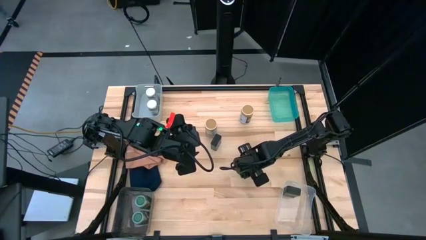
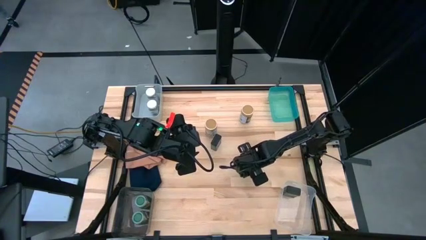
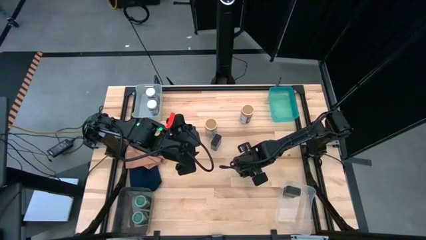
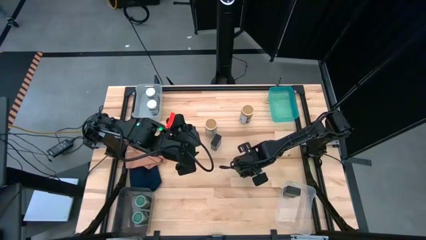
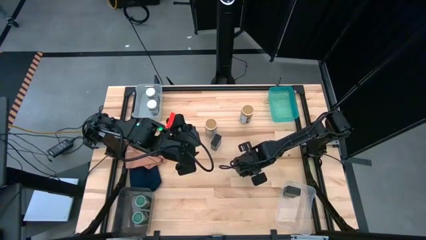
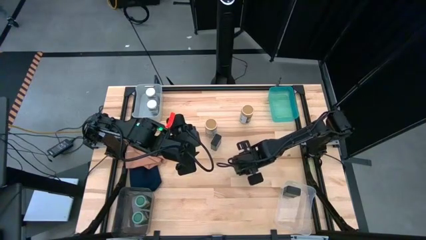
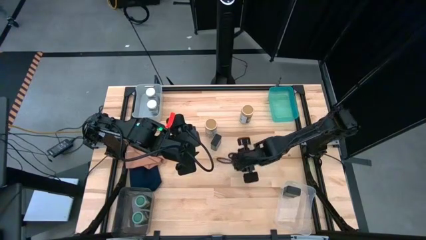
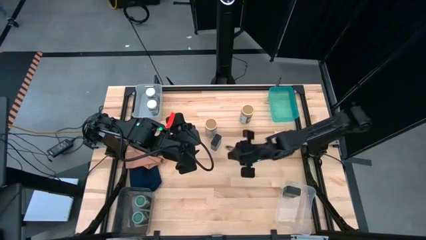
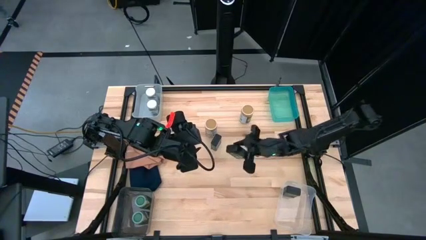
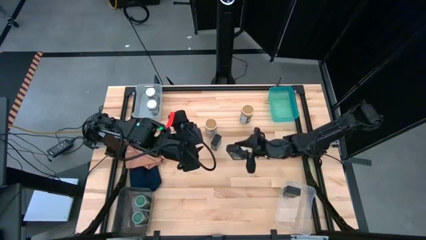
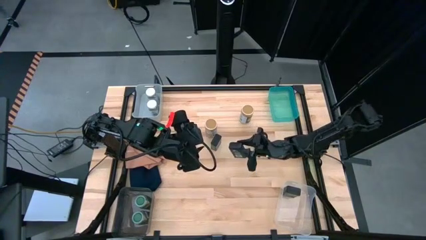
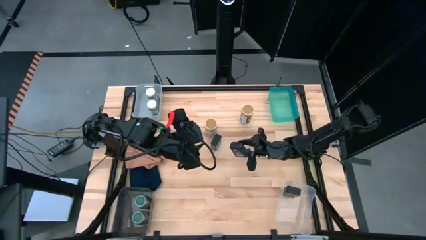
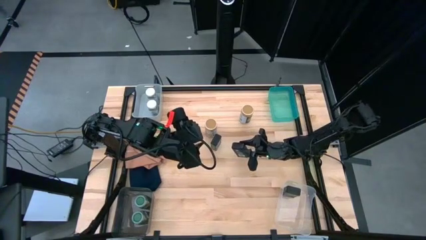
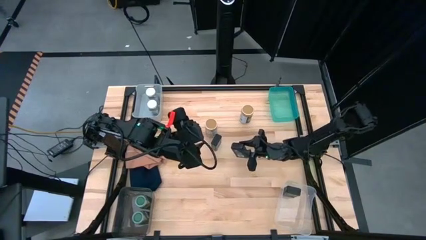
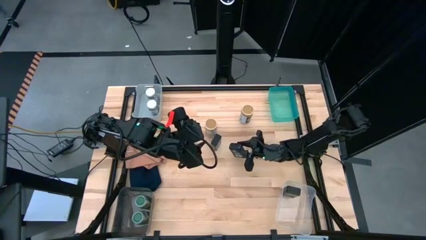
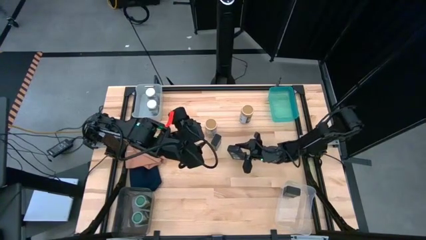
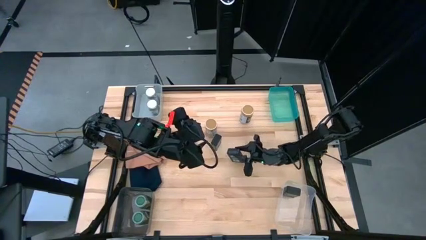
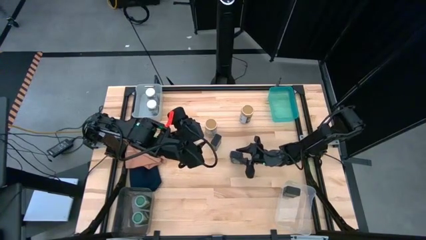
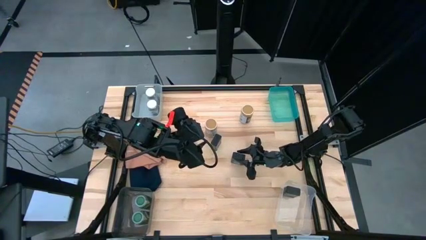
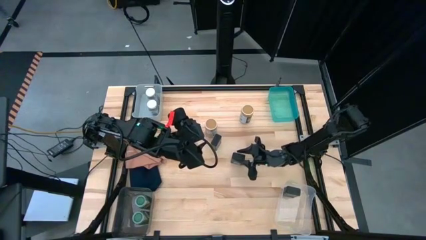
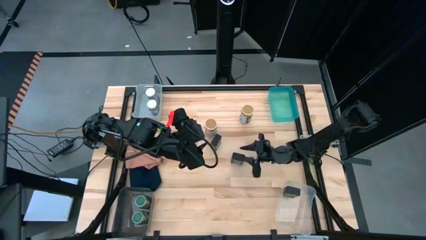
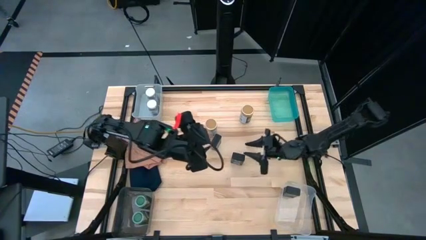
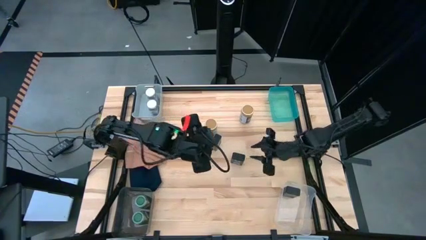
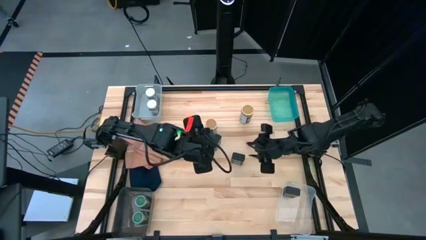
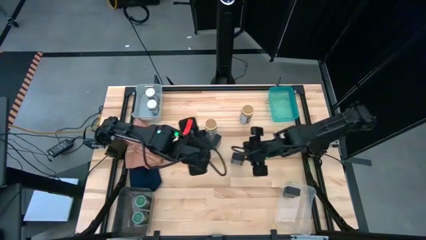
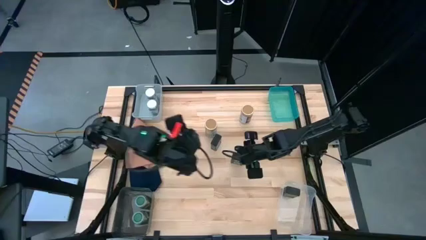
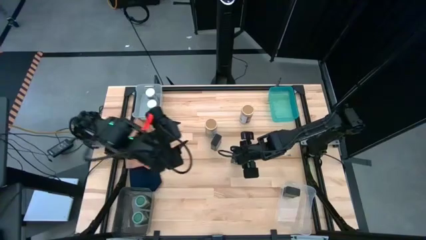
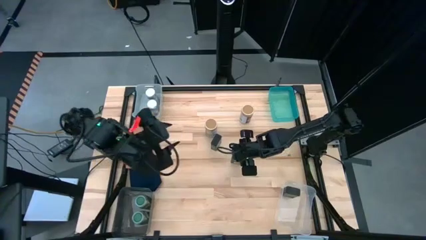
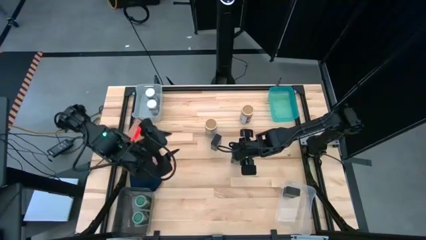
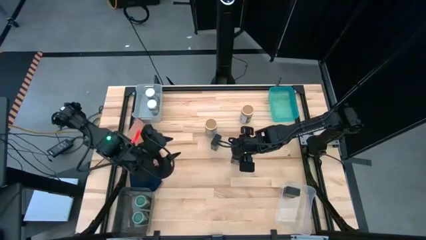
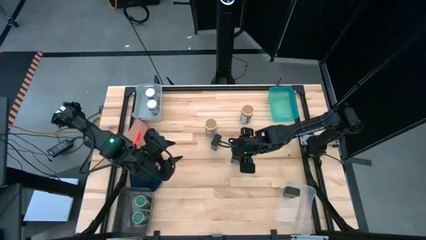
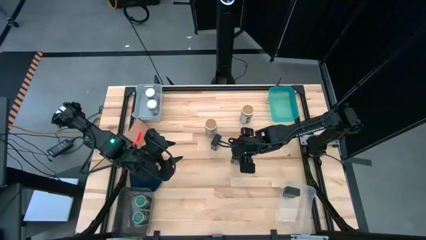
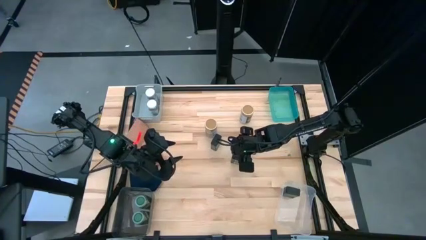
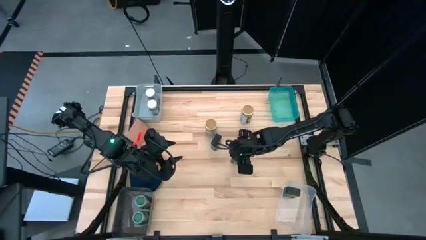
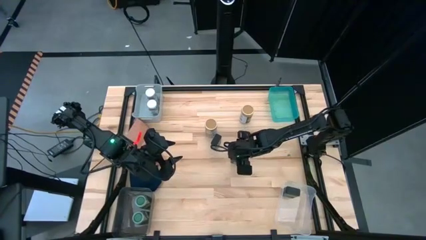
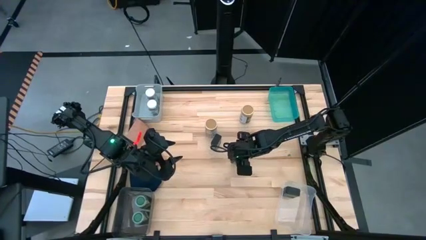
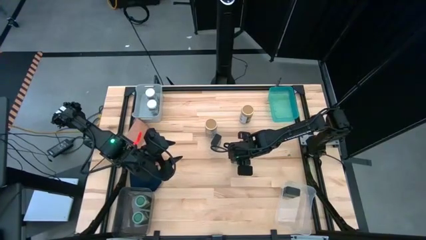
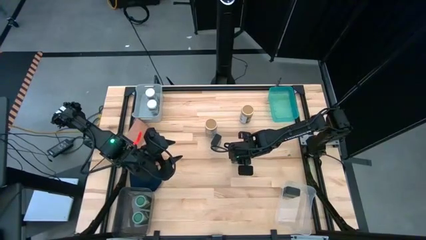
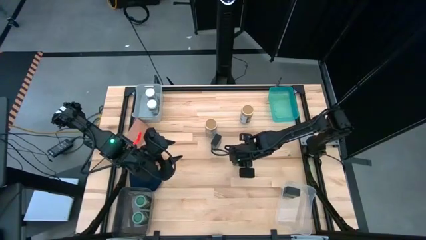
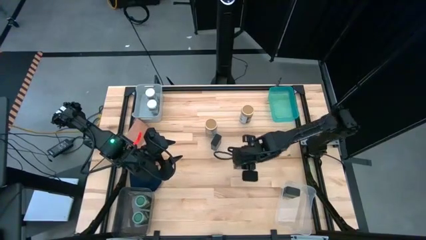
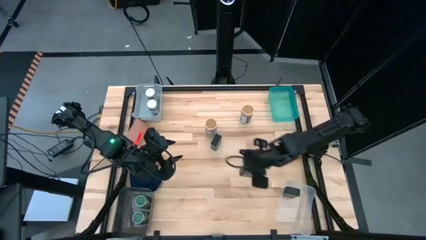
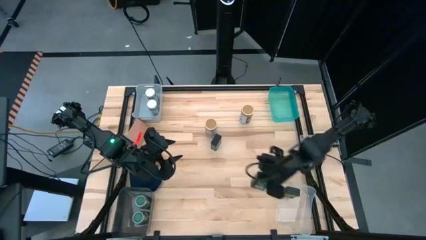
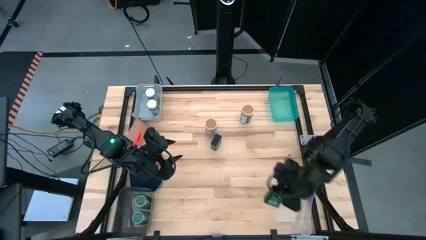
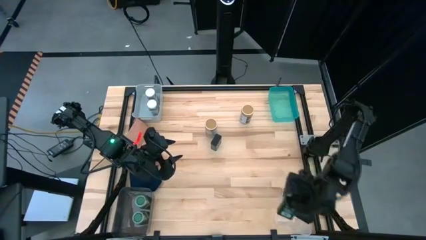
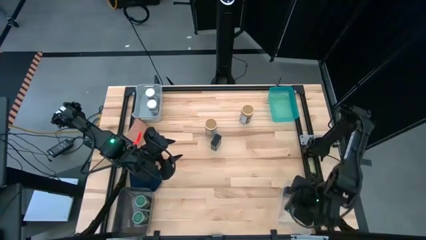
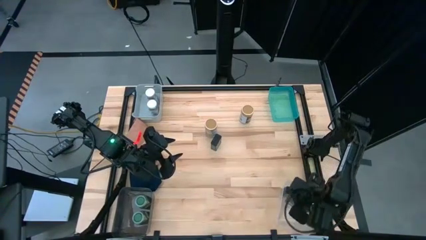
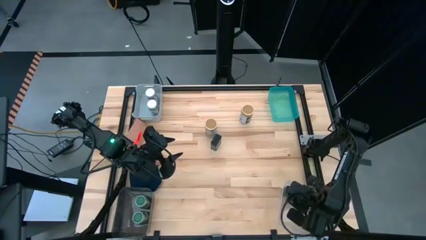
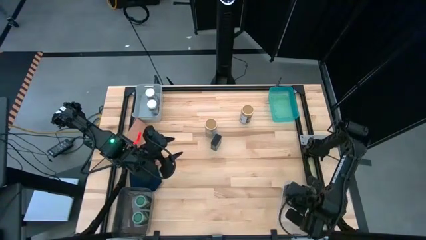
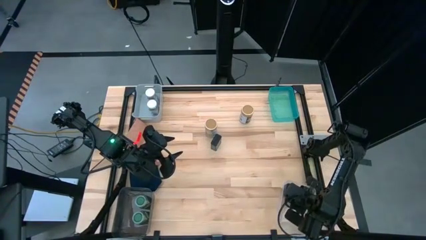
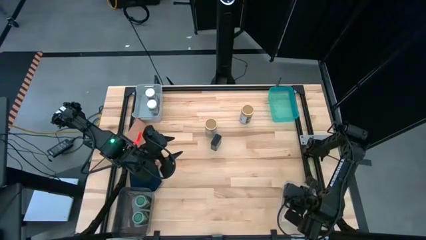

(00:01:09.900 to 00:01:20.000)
Task: Sort spices by type
Put bottom black spice can into the transparent bin

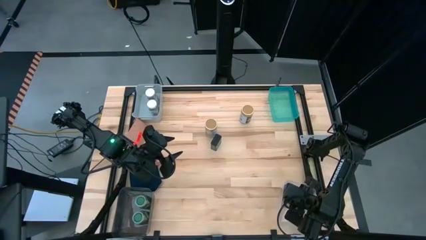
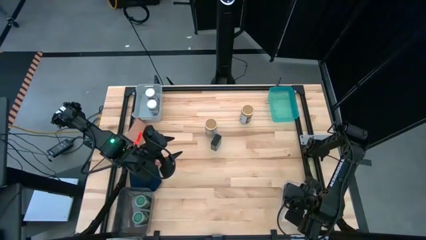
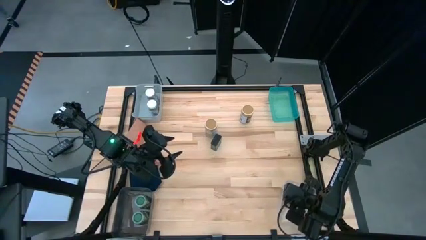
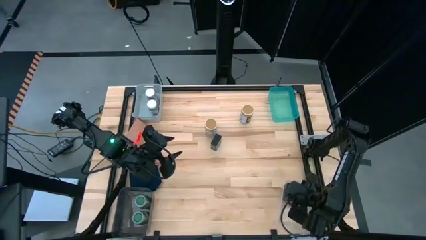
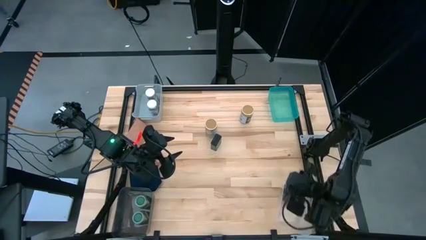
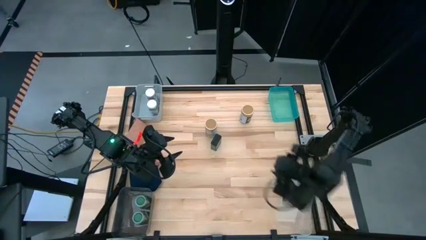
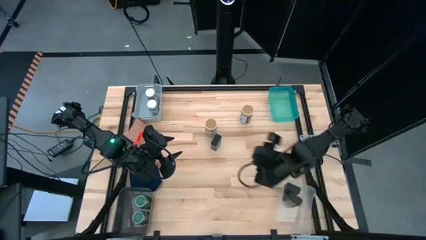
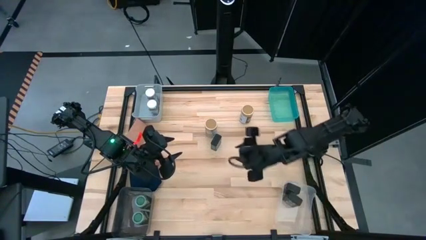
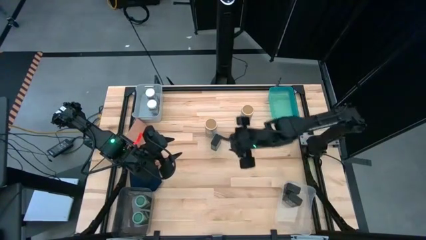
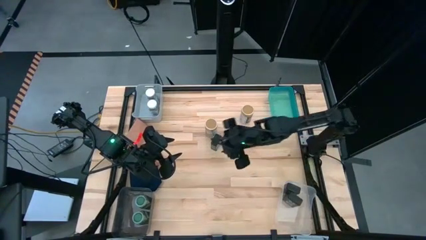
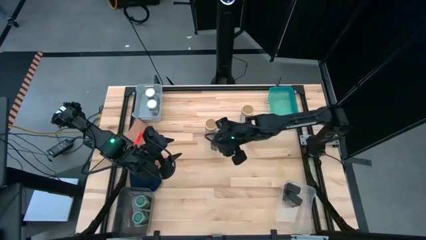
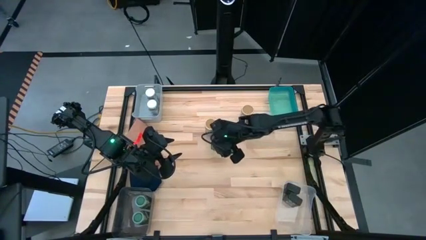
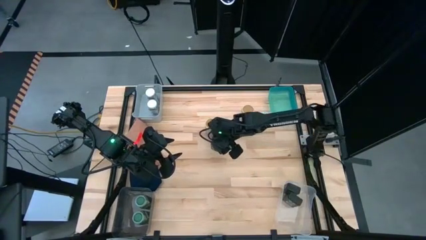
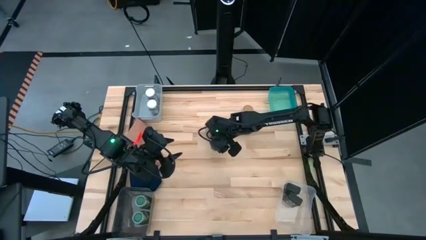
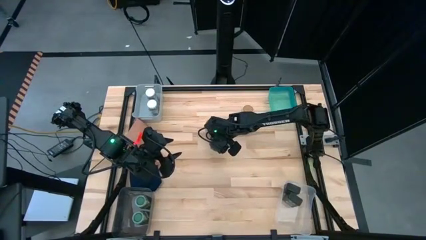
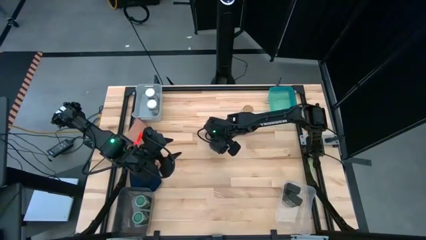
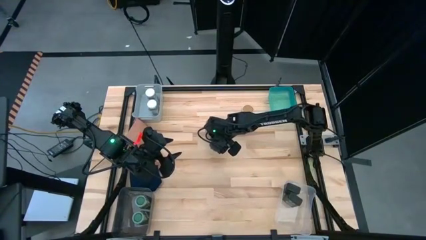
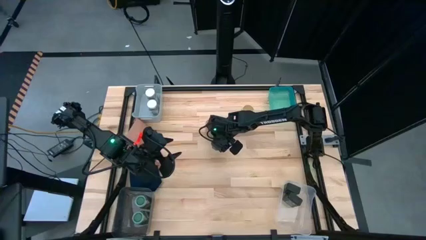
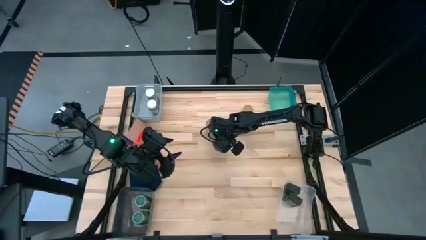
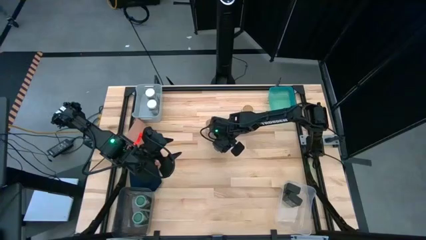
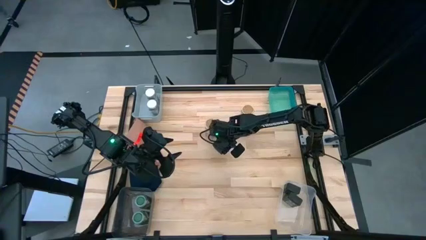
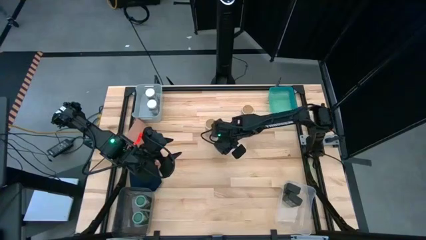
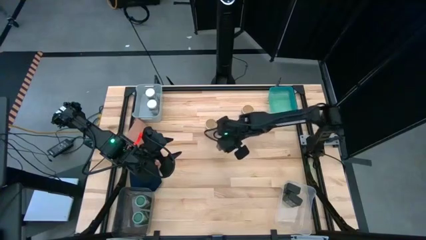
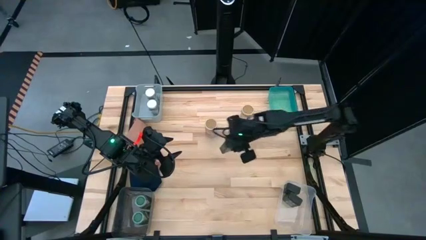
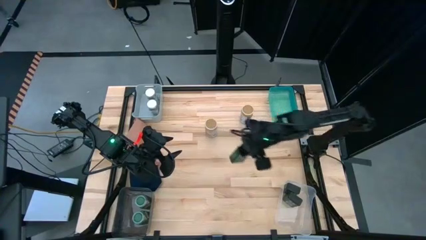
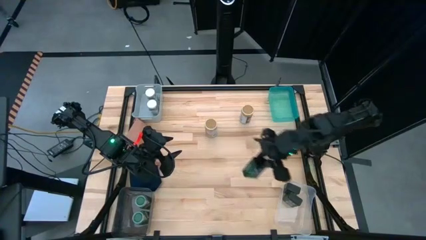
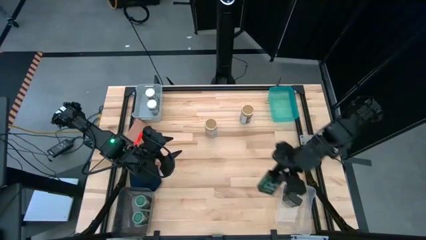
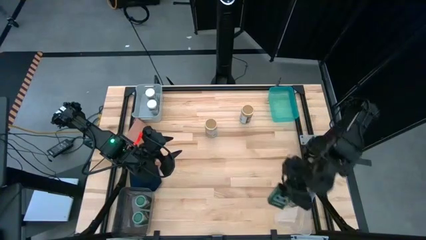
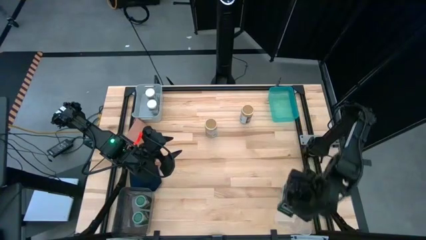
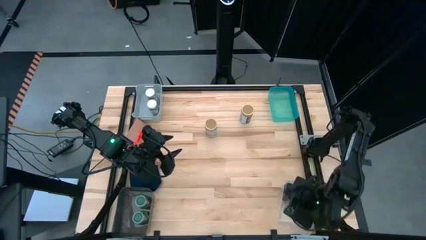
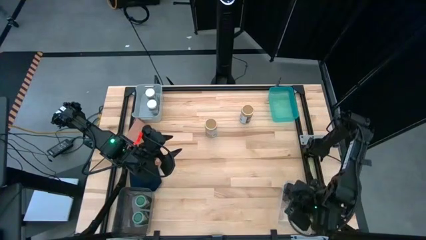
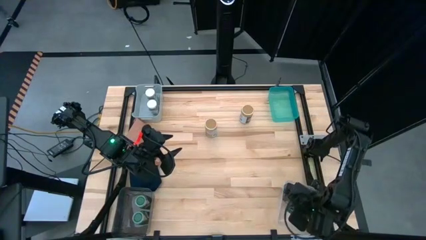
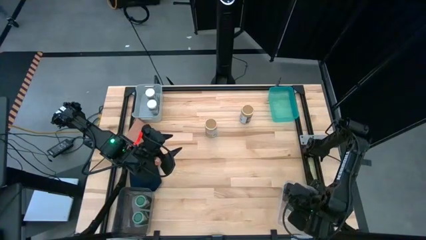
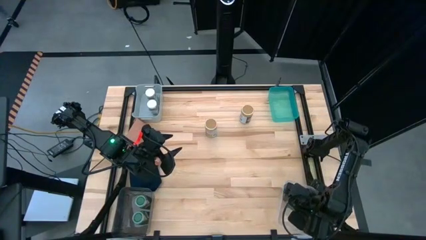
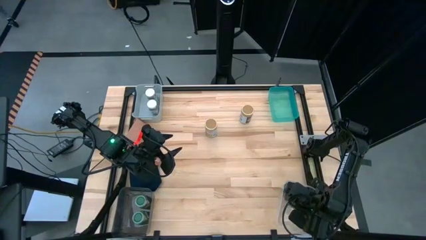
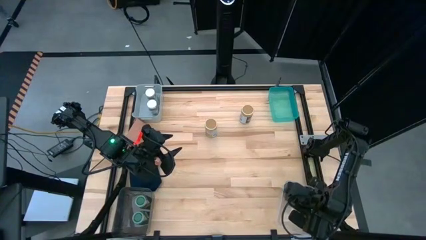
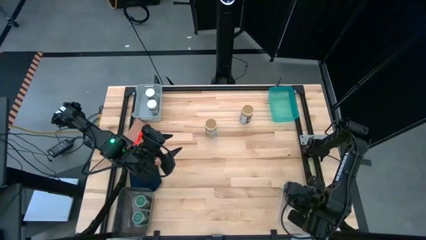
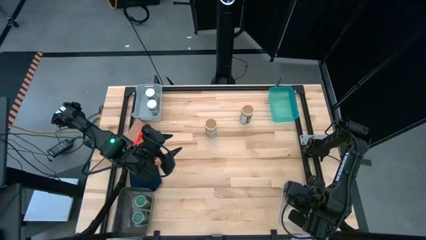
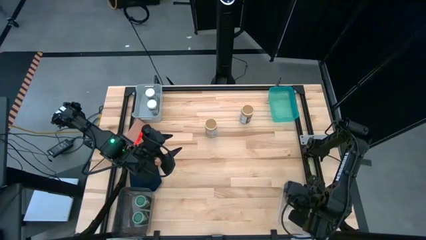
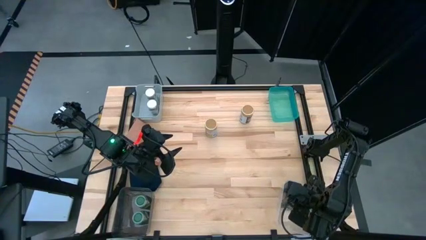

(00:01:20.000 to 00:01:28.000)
Put the black spice can into the transparent bin
